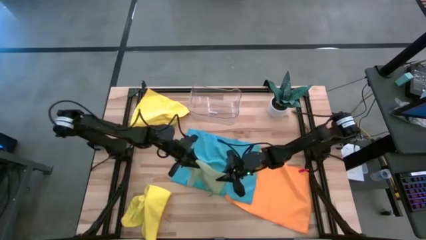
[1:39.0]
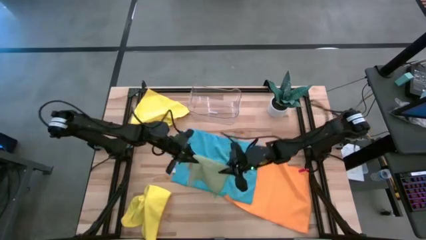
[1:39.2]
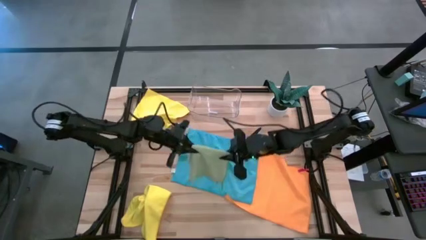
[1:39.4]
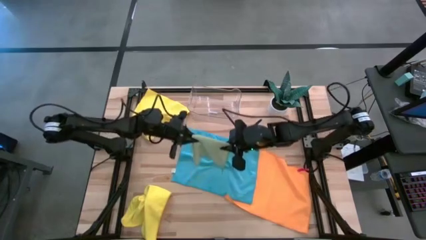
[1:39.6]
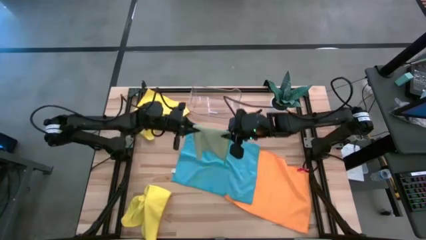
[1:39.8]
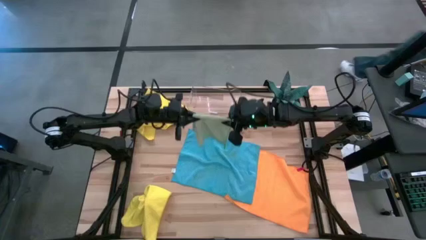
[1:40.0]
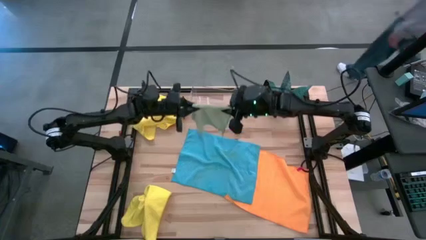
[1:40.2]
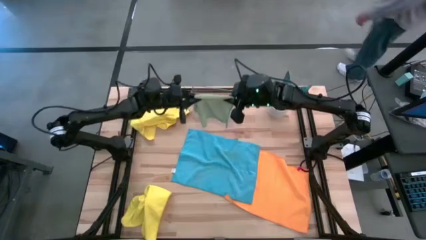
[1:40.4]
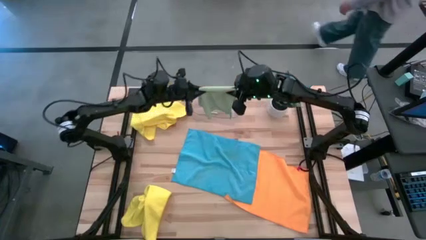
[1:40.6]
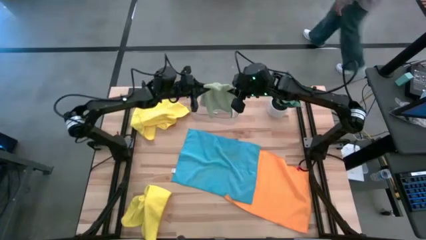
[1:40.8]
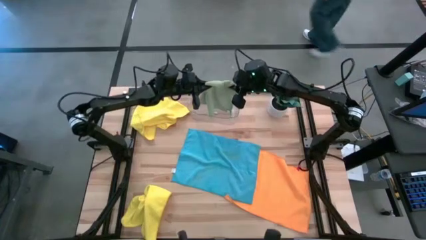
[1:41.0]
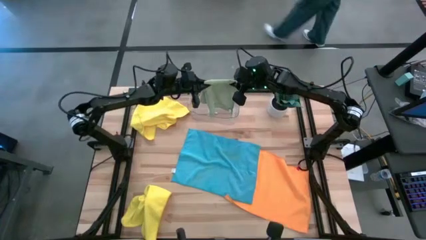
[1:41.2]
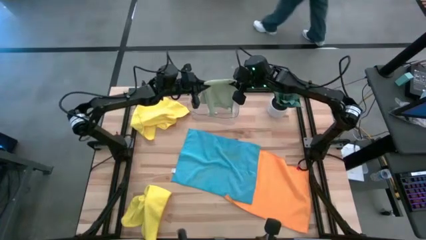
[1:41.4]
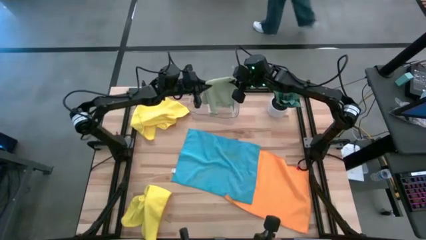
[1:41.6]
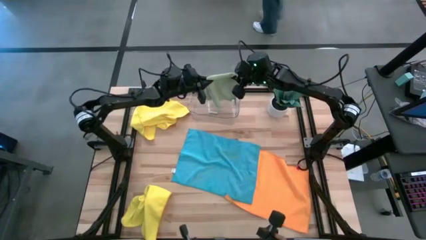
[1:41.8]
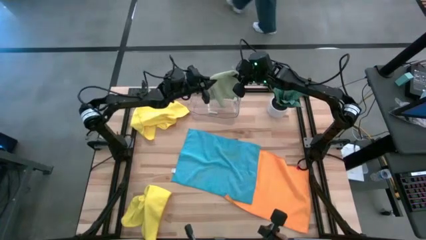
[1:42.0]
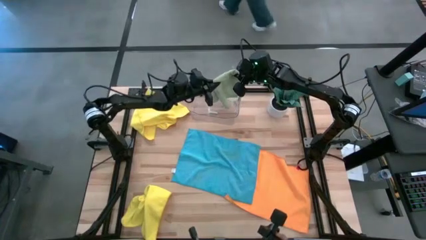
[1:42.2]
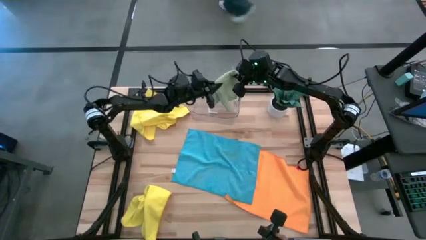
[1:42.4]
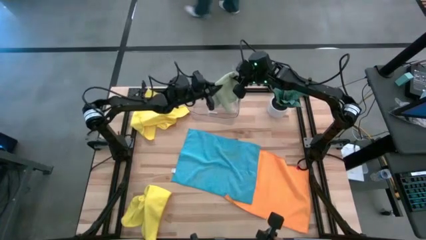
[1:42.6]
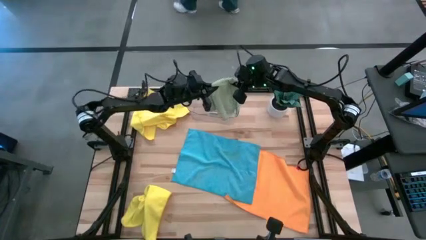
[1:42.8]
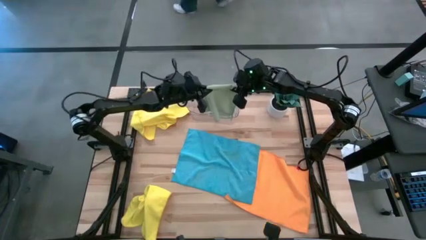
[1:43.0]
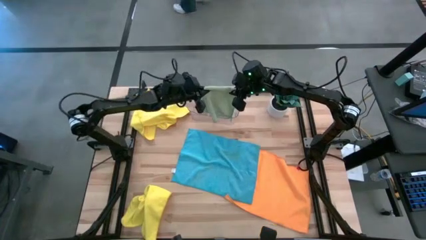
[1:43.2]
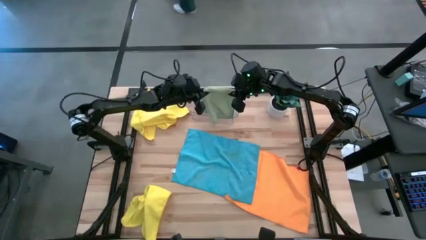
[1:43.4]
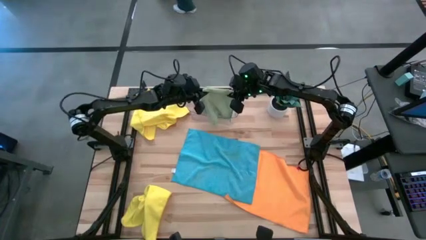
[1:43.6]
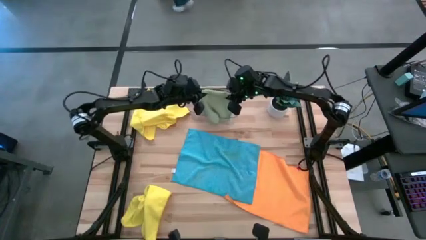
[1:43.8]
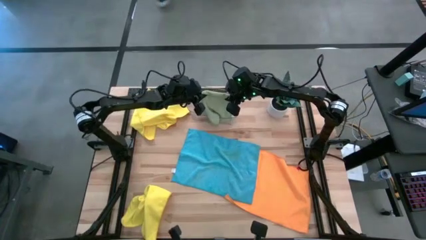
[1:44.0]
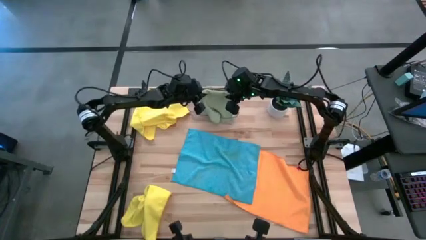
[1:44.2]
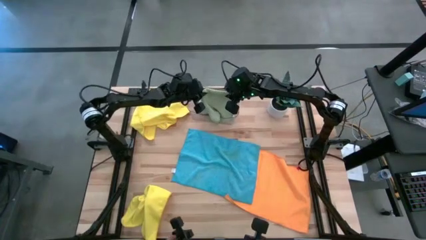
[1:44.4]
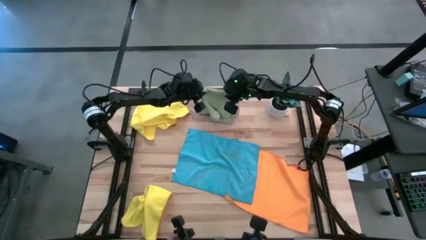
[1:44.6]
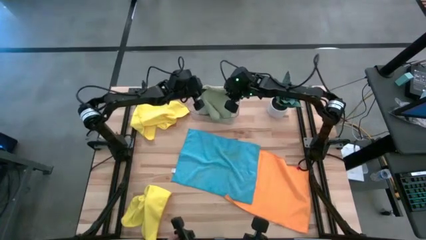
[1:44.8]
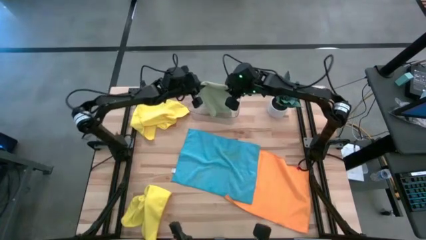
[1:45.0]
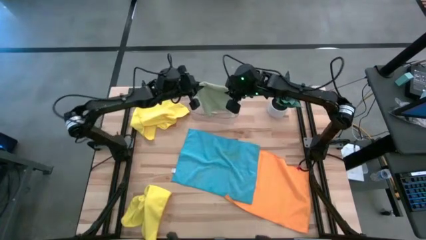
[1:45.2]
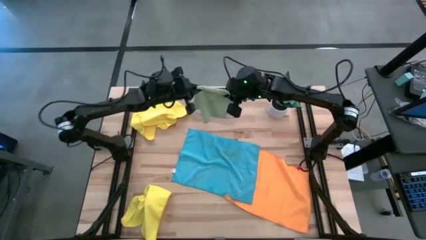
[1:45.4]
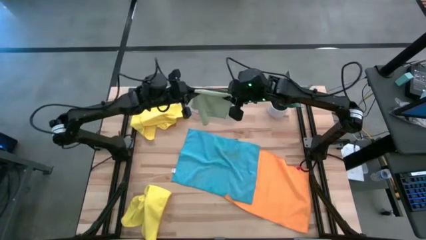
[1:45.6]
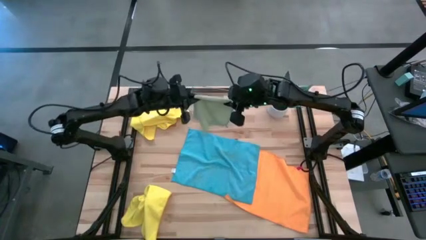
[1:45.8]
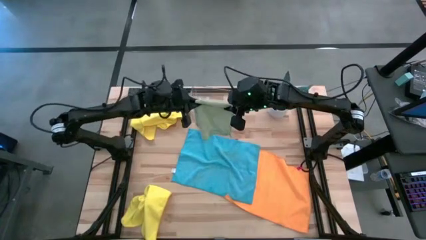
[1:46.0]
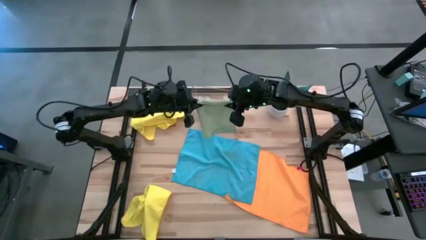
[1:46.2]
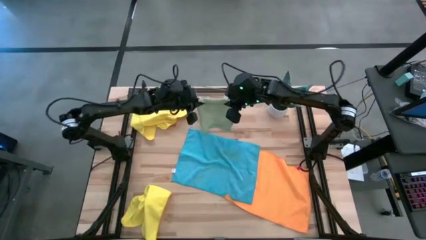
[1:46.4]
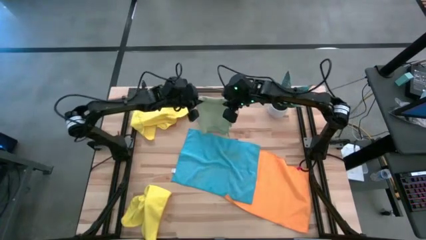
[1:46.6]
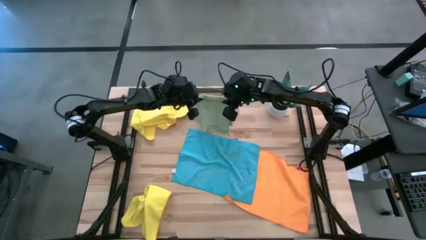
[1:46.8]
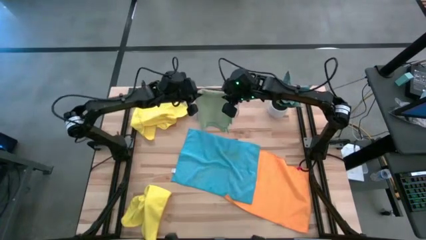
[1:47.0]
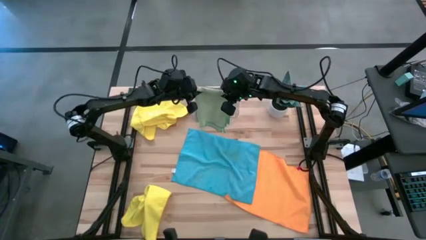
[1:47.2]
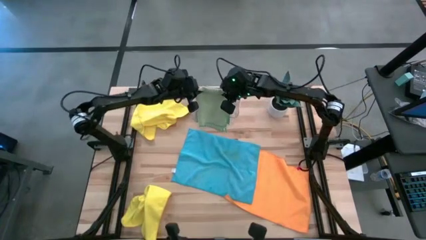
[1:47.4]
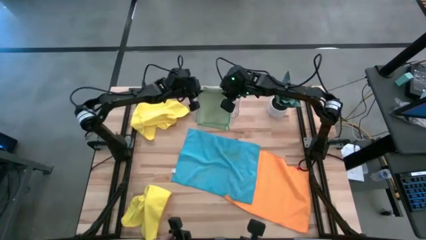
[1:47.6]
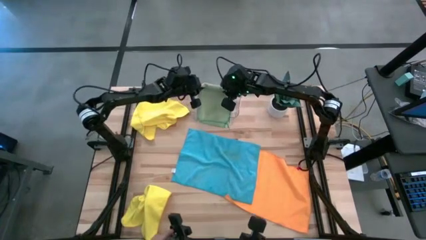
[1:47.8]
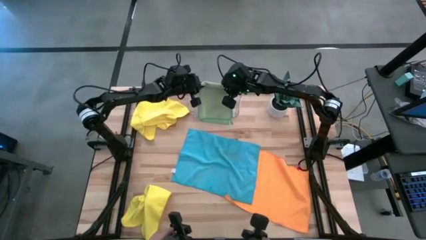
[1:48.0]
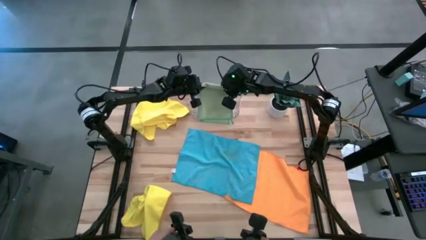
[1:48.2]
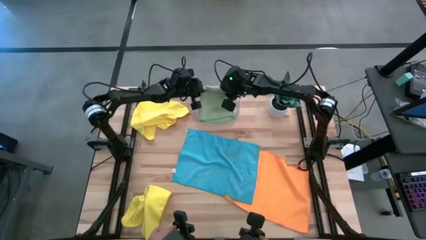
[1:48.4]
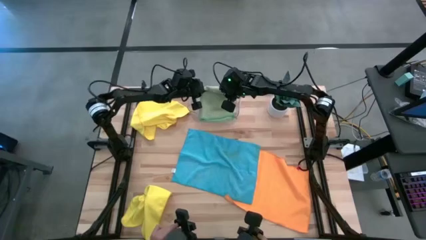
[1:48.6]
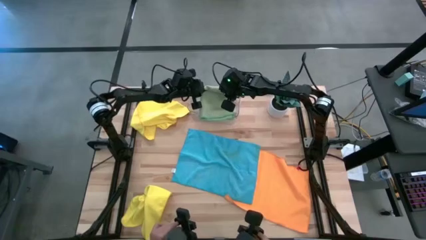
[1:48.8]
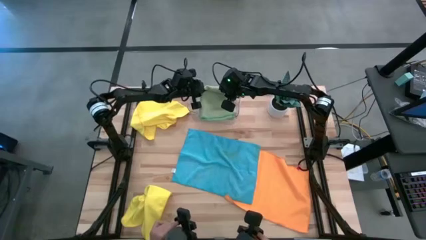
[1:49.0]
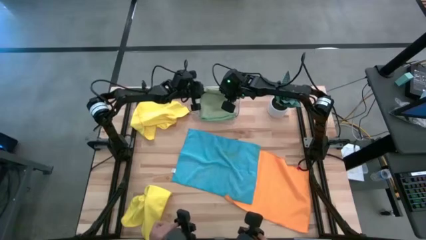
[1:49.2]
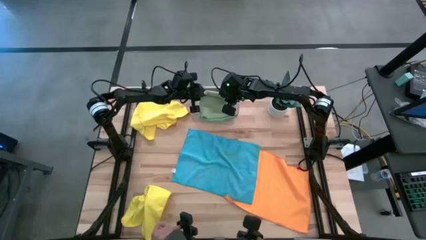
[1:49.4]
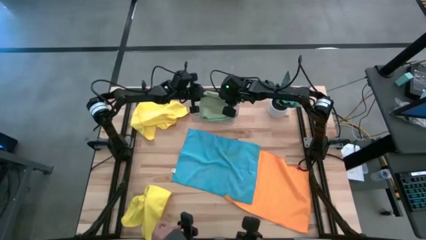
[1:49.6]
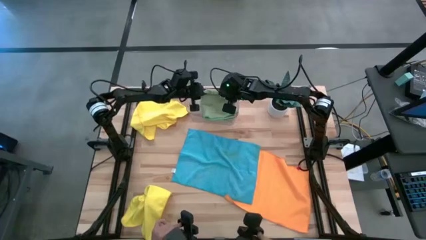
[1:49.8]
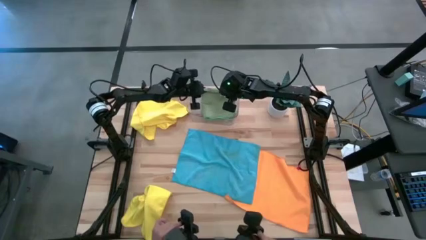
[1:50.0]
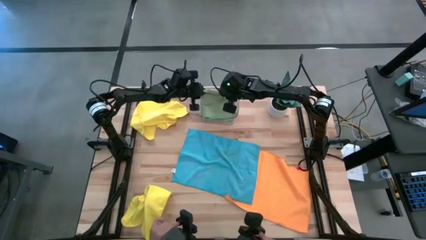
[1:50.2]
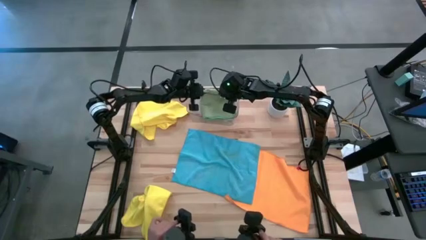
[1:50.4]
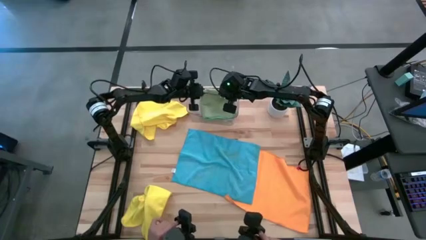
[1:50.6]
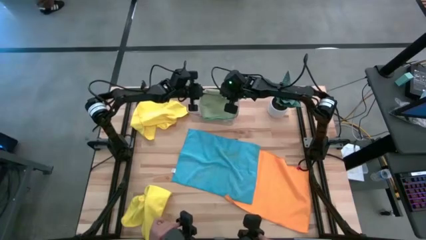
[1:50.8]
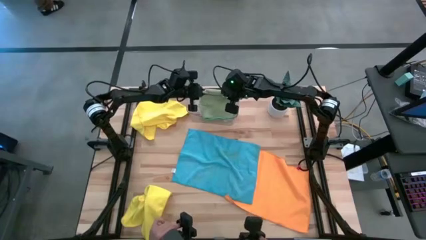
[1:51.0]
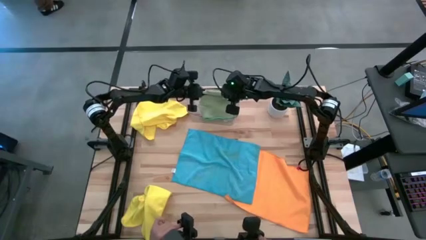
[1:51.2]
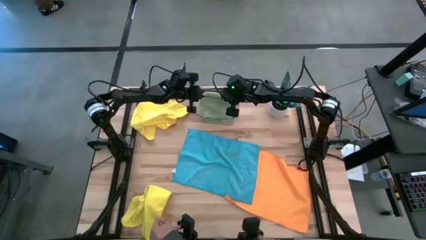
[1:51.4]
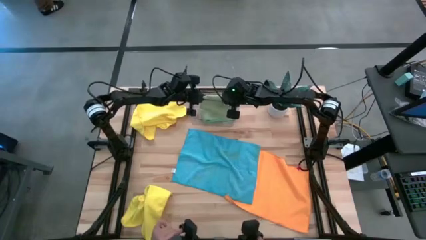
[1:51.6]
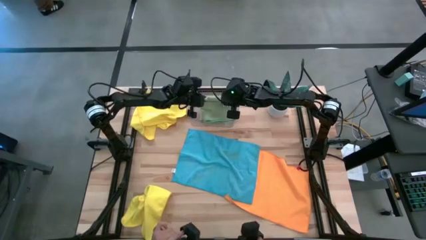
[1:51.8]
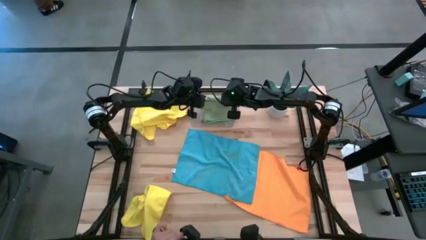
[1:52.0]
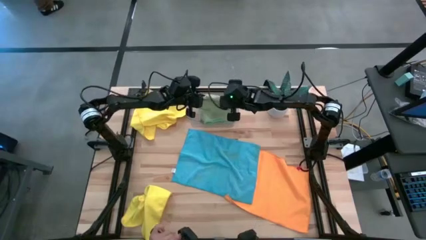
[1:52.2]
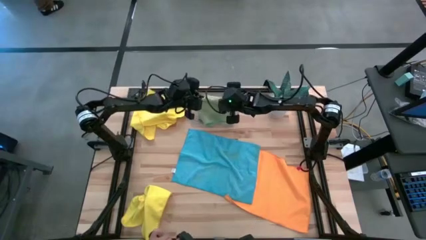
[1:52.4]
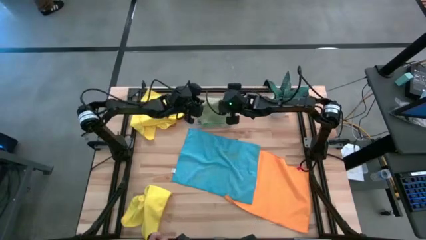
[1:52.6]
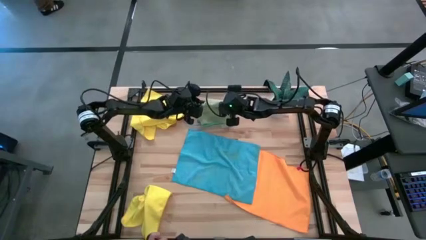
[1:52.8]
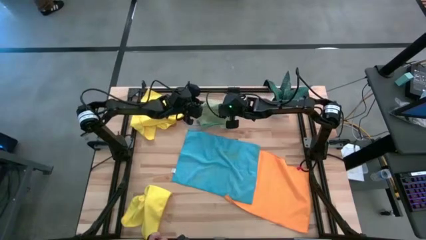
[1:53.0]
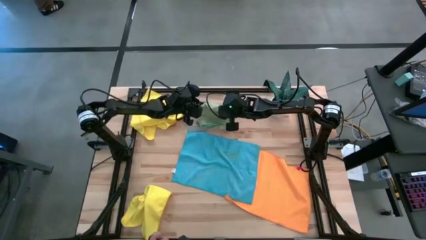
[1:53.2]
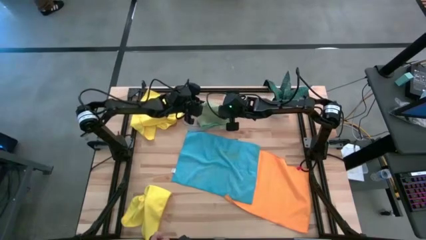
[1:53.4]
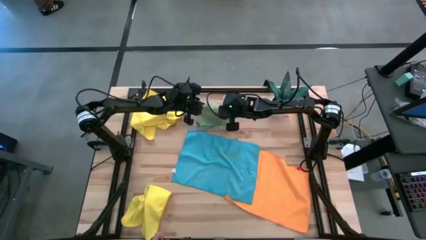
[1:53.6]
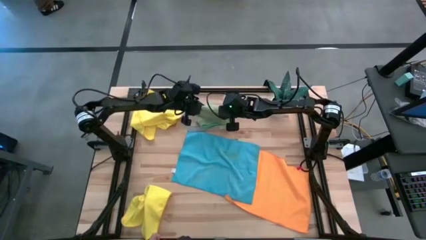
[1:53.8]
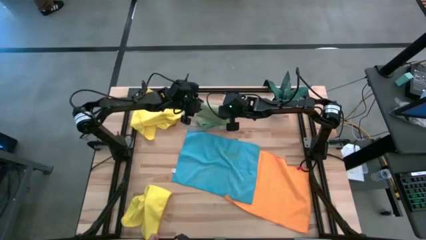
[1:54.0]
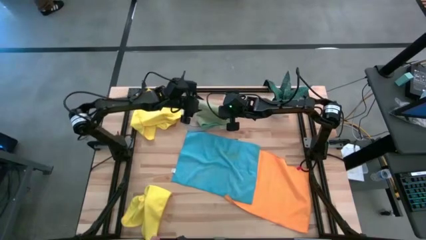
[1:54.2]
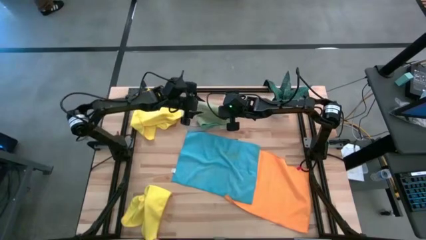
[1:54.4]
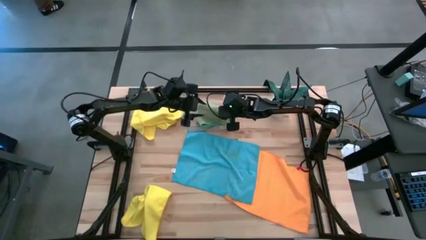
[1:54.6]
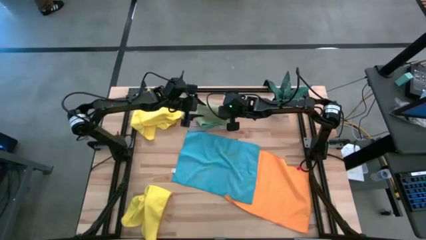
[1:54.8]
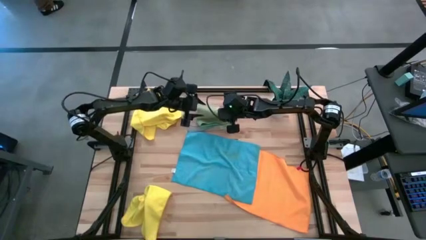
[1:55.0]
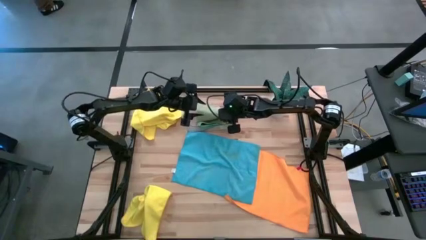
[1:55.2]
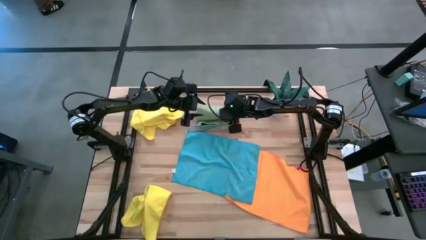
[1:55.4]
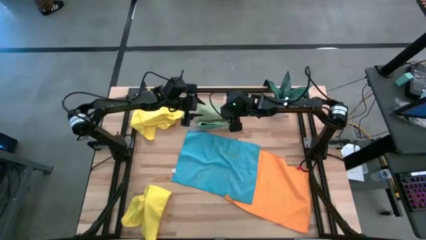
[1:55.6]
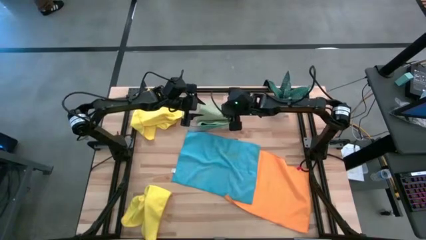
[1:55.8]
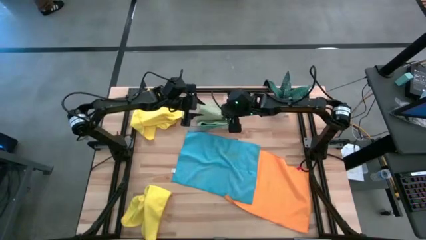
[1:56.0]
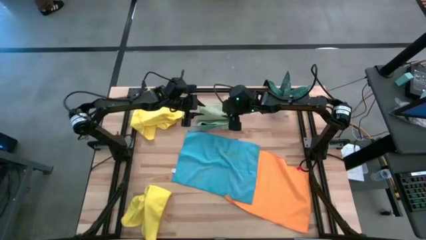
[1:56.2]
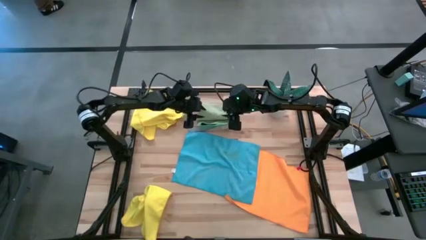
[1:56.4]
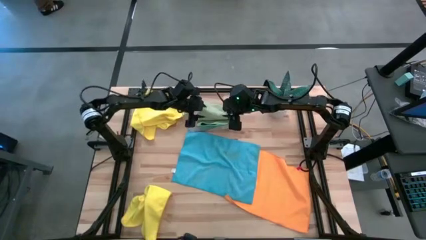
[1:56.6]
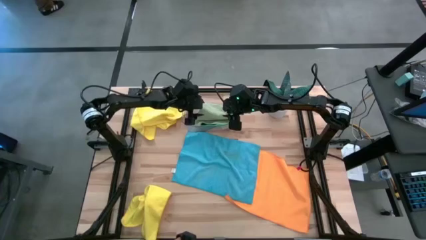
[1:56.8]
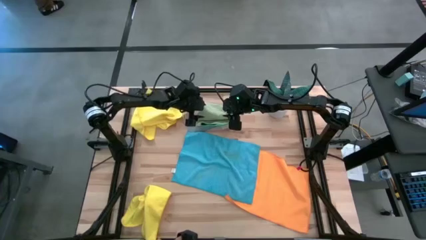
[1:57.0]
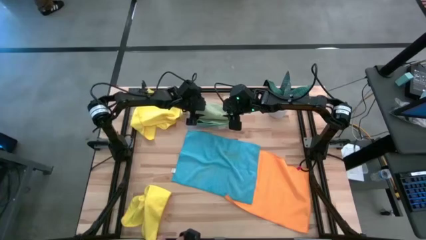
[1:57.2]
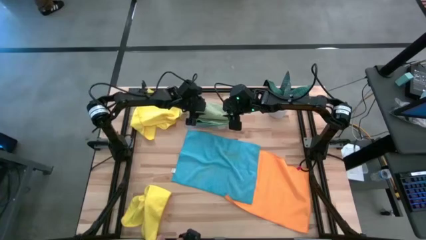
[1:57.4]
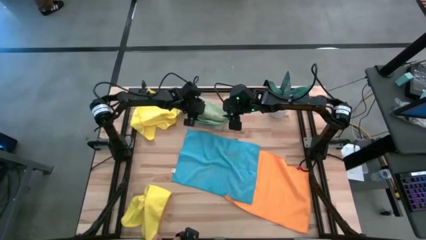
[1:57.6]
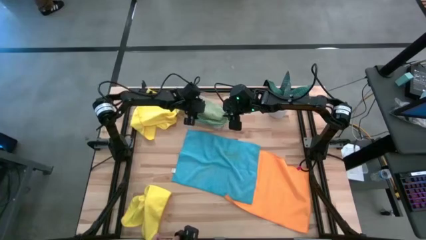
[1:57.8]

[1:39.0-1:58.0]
Task: Fold microfiber towels
Fold the green towel
